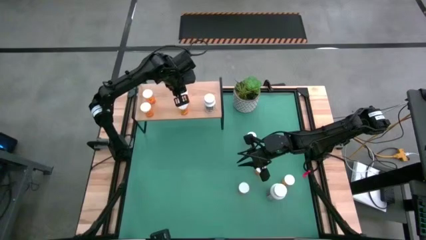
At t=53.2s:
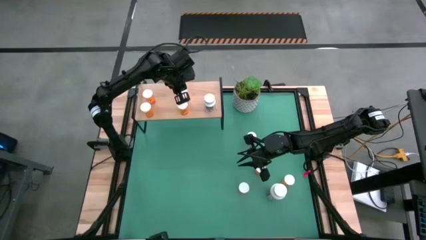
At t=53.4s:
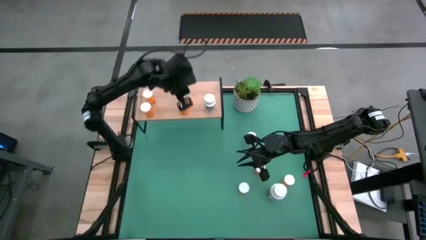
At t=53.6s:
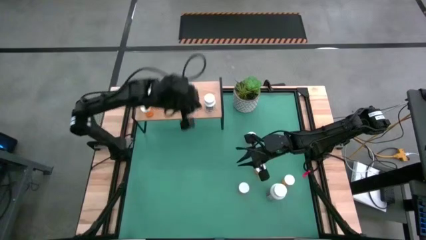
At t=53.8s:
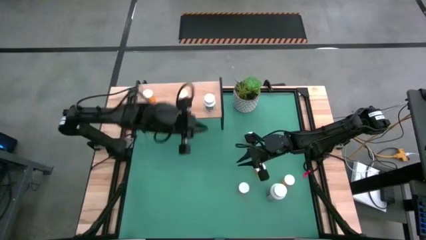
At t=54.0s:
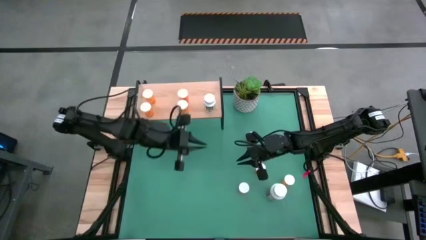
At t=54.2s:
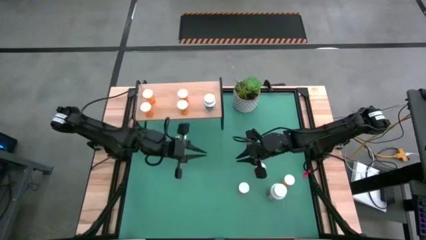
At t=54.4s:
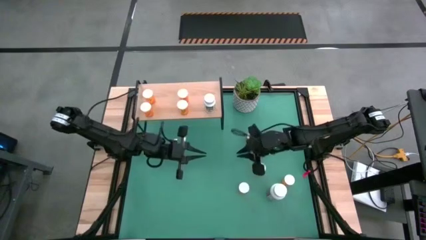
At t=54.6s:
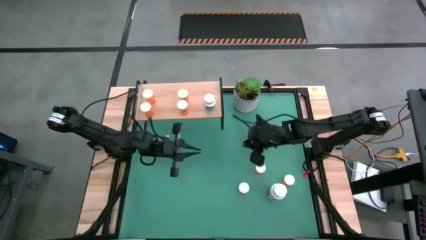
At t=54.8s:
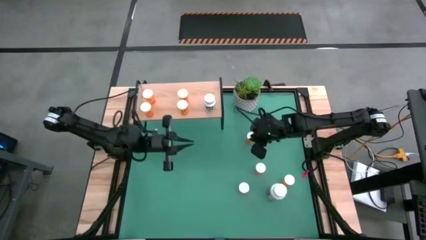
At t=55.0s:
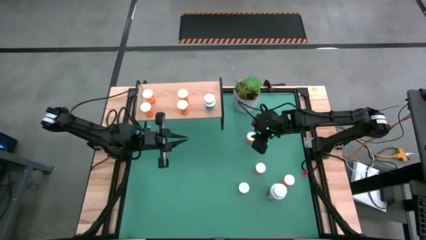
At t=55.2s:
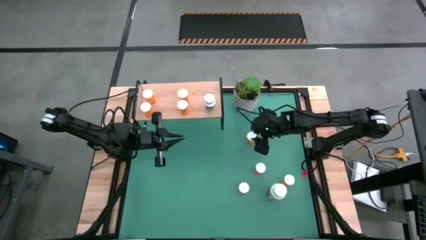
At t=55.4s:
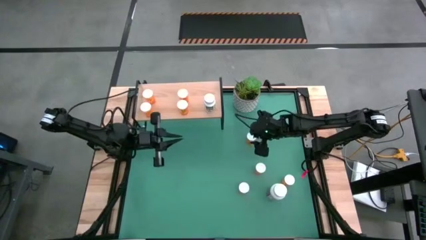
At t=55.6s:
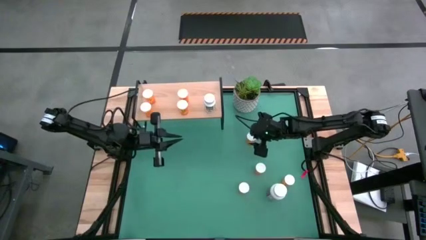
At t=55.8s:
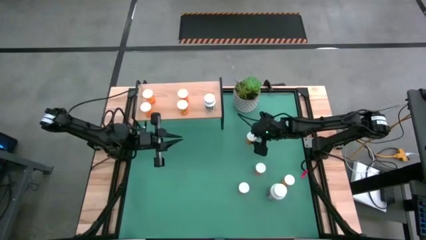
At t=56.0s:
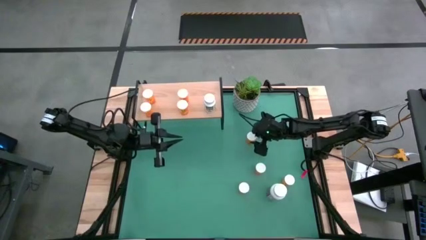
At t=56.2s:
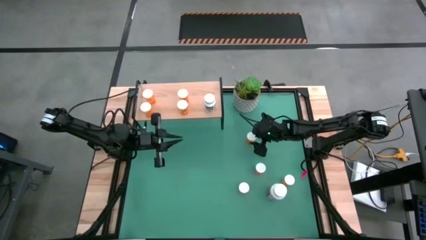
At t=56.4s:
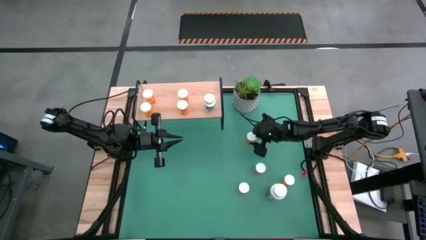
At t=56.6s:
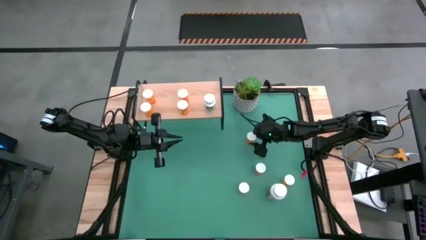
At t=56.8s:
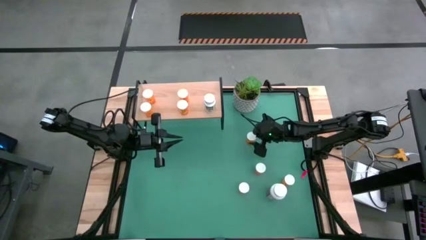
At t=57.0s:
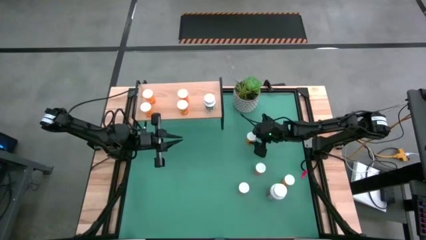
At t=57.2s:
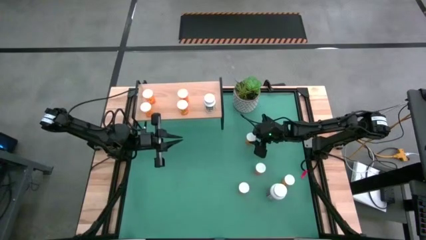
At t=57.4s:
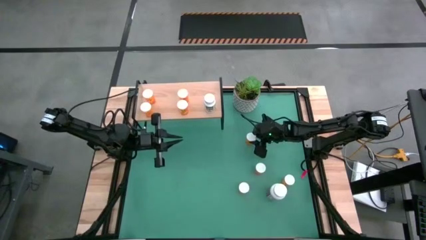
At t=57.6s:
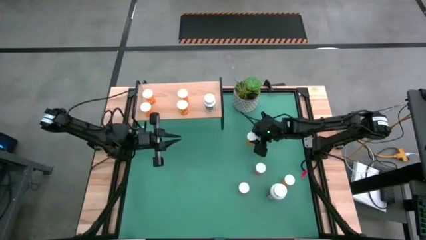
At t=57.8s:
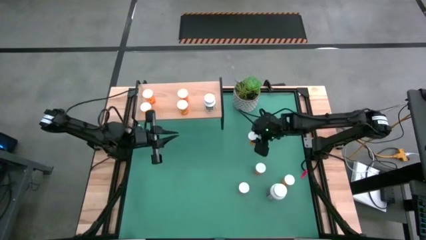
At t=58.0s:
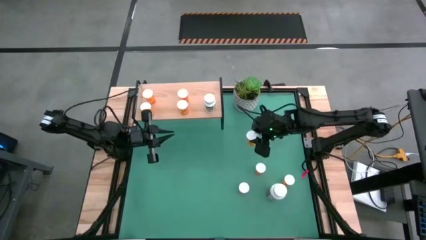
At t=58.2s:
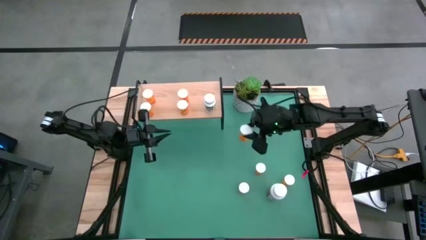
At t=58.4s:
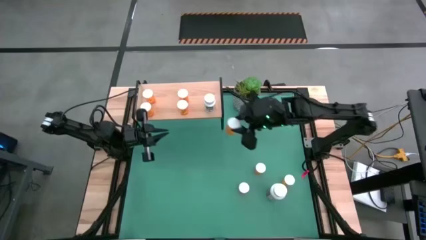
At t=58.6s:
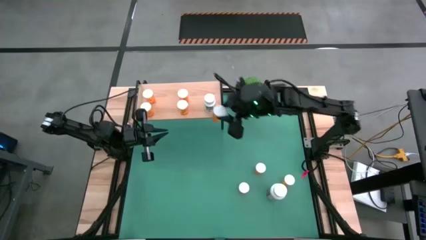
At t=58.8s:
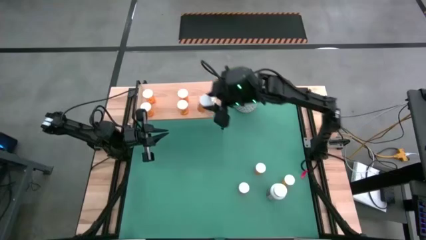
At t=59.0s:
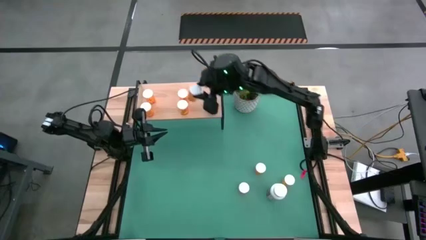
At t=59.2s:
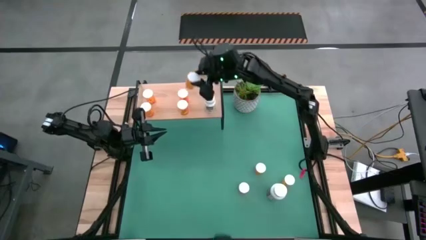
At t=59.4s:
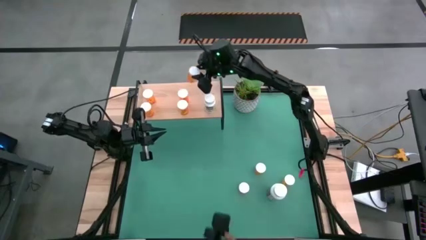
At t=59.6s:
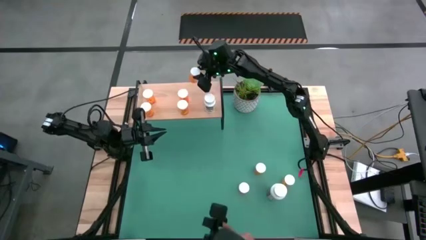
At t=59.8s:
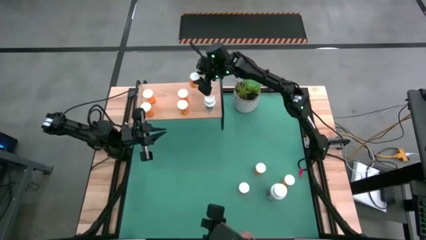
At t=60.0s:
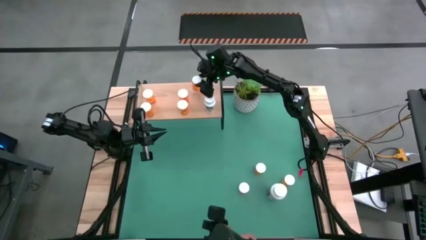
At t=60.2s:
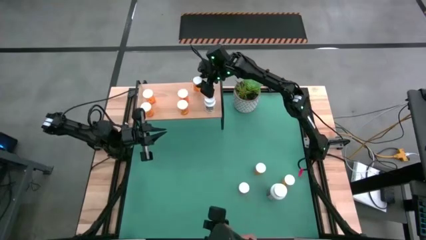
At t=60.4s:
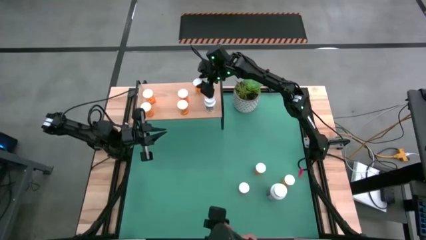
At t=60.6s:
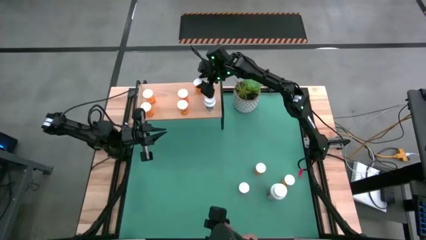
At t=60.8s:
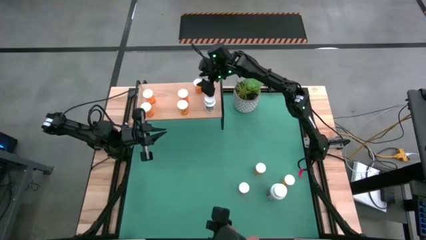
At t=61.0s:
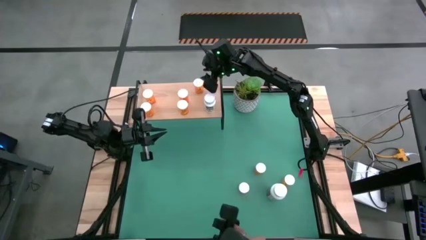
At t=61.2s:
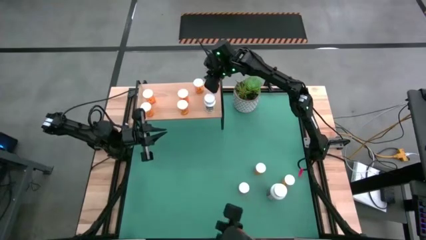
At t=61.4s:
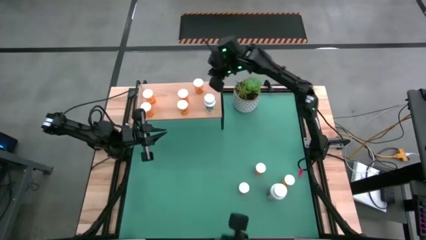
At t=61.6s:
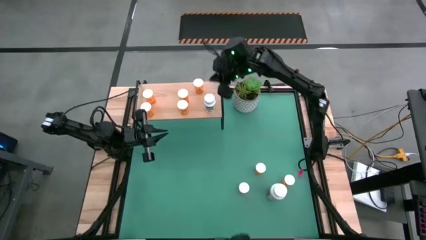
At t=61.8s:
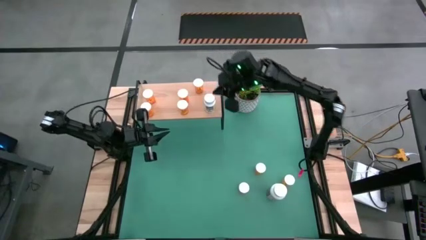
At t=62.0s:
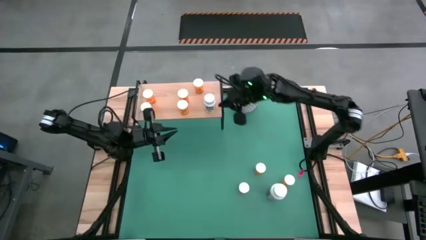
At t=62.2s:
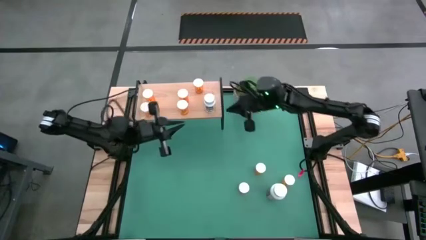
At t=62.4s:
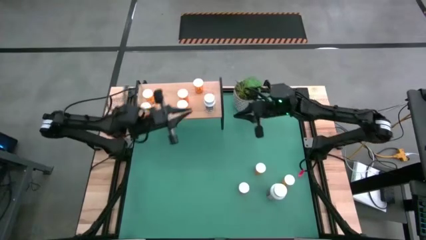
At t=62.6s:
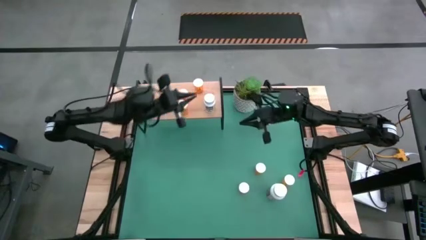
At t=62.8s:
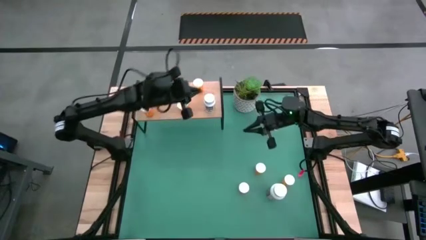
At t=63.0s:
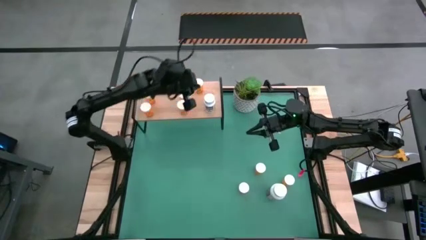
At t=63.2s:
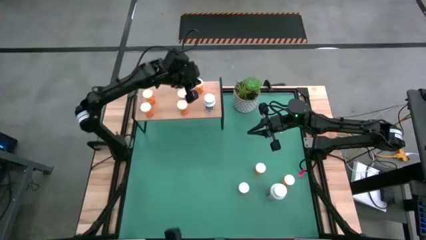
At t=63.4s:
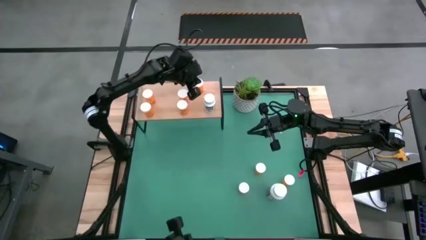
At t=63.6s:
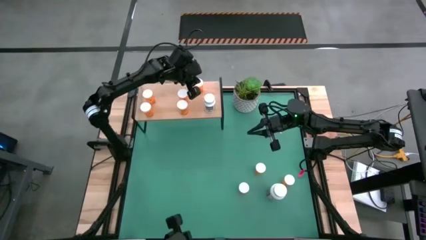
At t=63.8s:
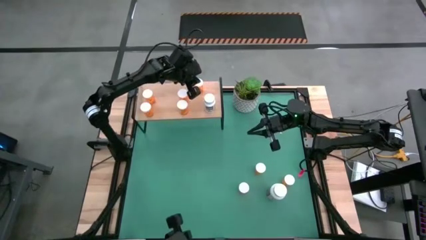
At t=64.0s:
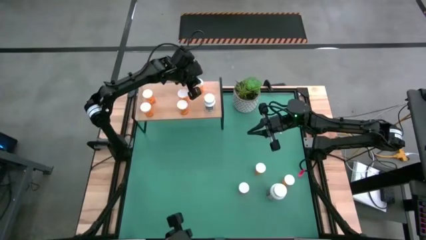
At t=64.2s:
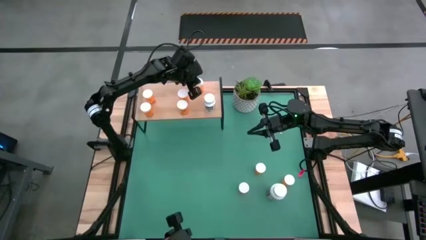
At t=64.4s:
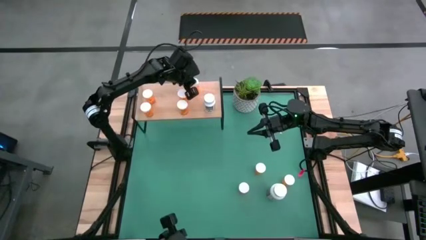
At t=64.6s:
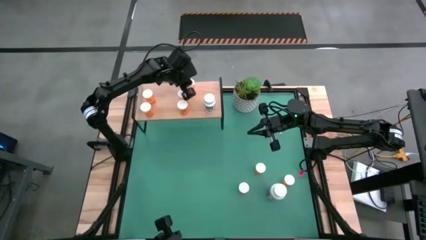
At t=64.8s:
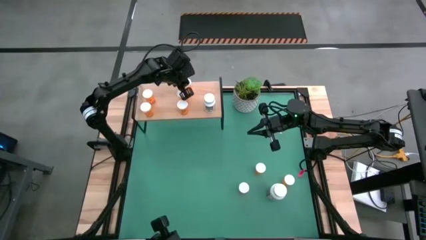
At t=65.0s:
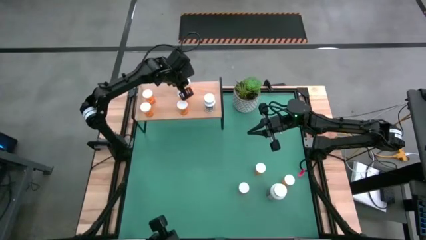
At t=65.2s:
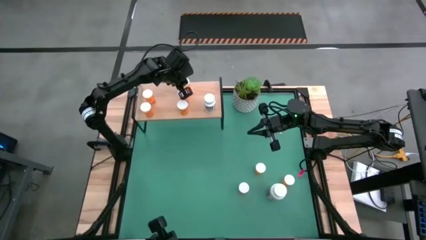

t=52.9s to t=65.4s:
Task: Pick and place medicine bottles onto shelf by color
Put the orange pill bottle on the shelf aligned with the other orange pill bottle

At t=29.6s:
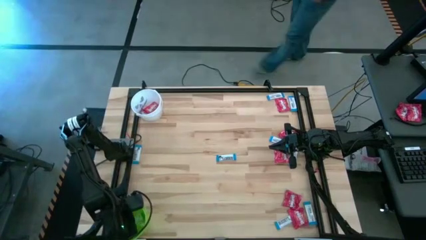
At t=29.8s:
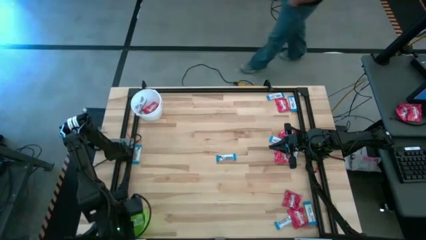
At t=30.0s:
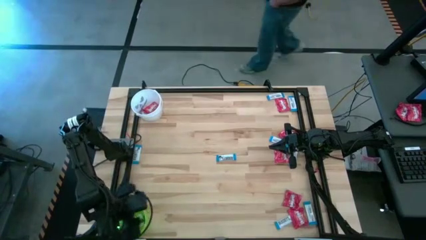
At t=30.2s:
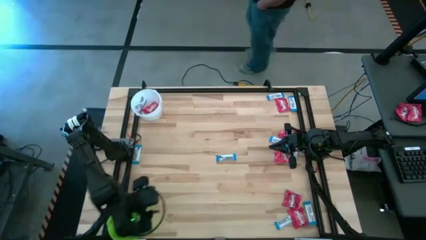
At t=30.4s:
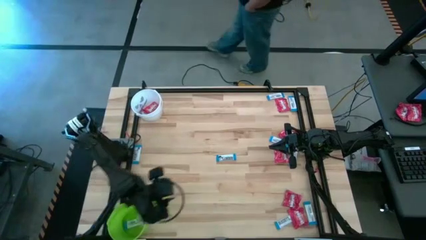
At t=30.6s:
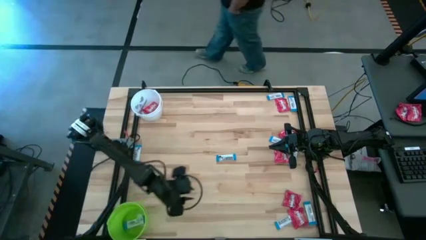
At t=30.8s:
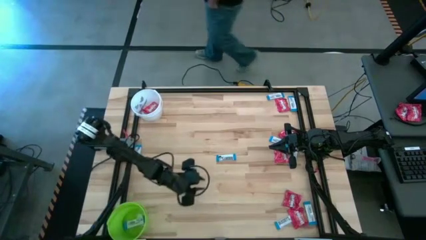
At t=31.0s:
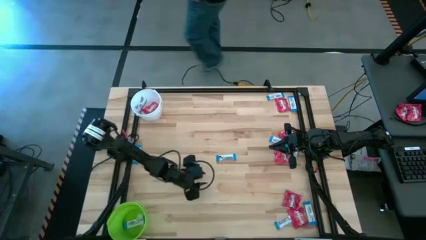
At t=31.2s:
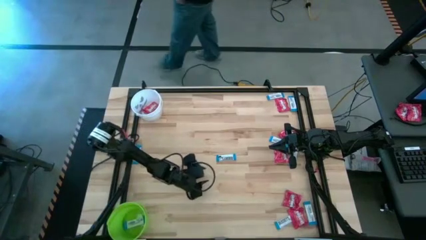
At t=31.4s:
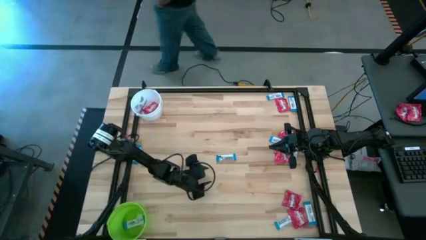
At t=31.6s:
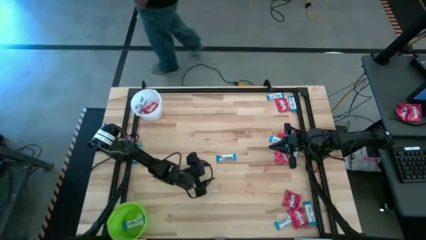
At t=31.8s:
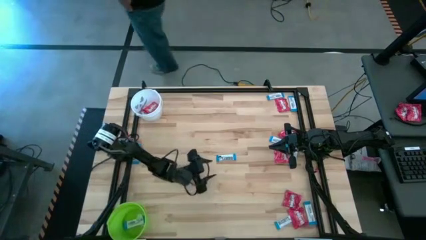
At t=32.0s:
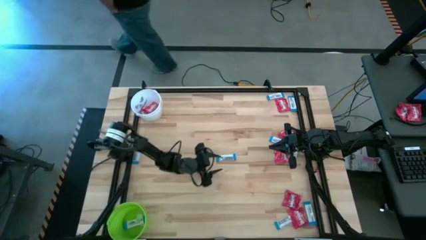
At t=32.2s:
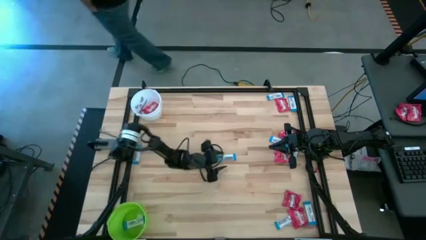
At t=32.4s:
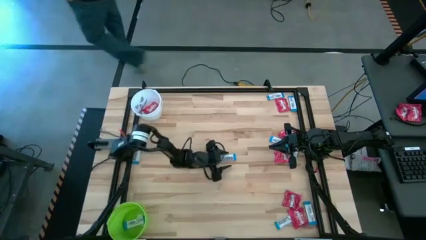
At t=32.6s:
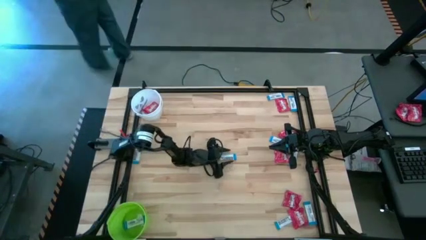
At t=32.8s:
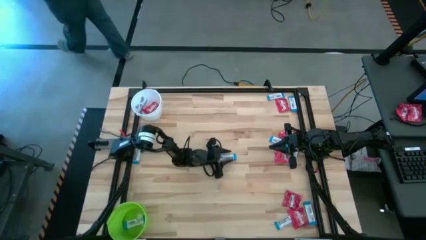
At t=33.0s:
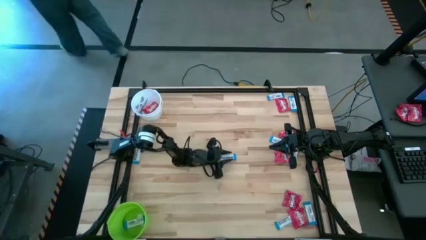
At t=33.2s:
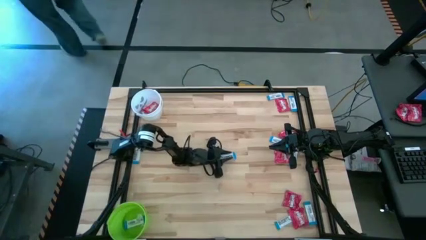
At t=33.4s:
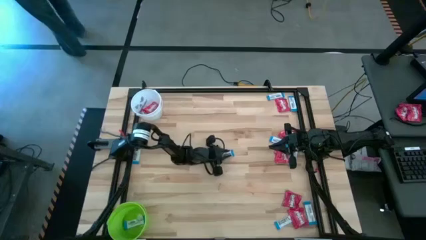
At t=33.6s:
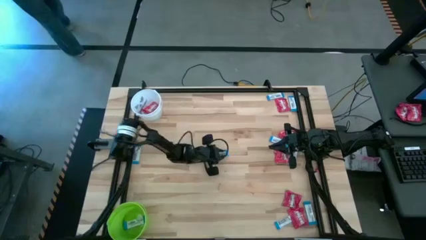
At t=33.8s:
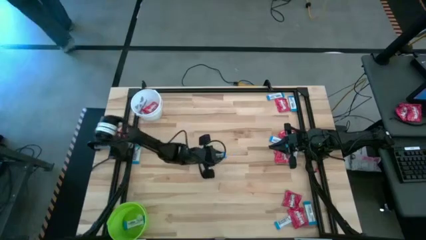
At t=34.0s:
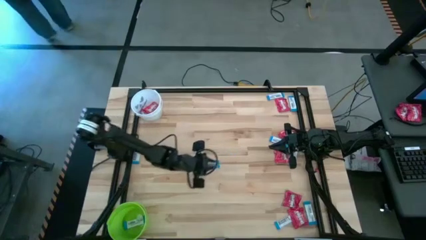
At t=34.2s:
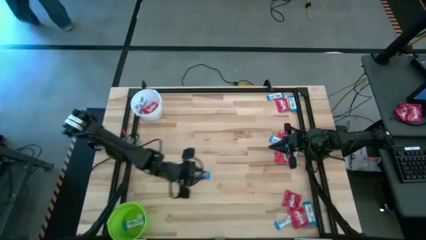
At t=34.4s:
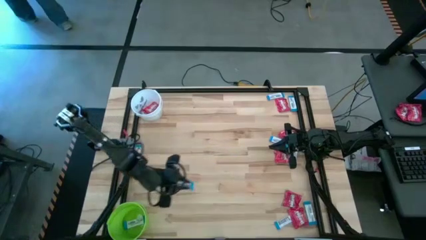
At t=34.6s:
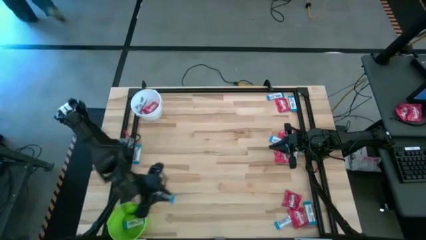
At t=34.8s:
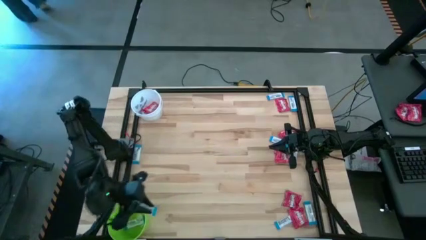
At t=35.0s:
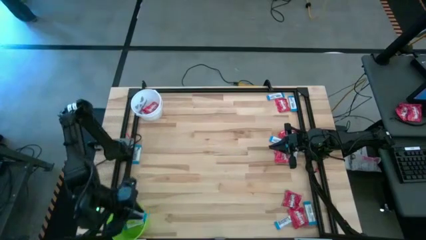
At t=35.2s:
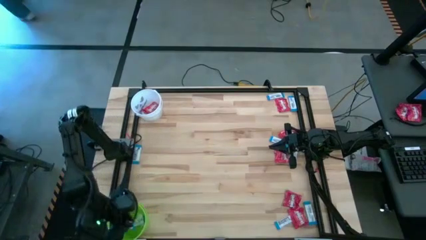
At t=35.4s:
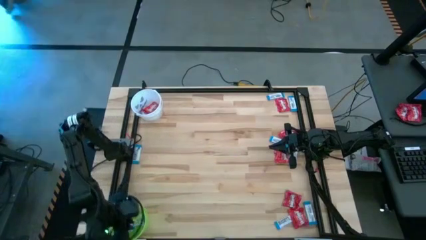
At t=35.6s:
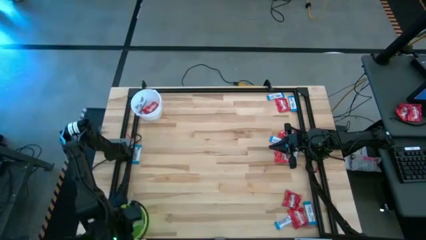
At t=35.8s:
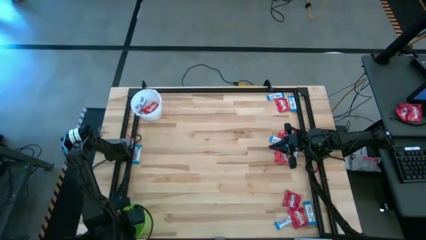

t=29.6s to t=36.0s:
Task: Sort candy by brand, put in halloween buckets
Put the blue chocolate bar into the green bucket
